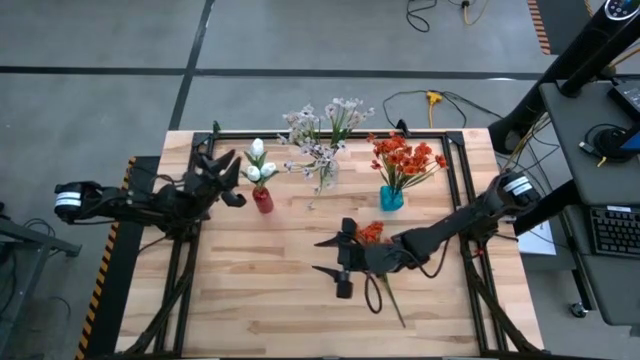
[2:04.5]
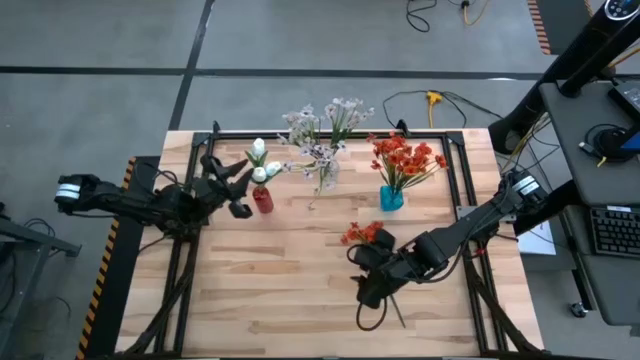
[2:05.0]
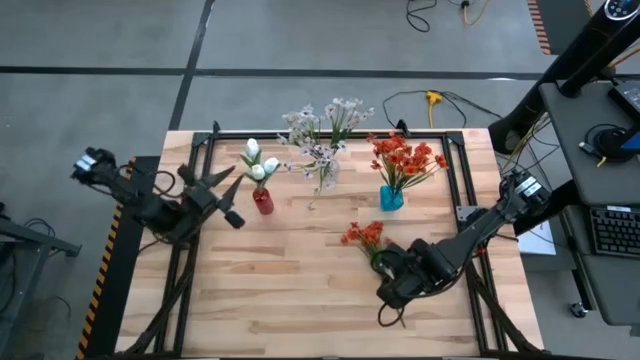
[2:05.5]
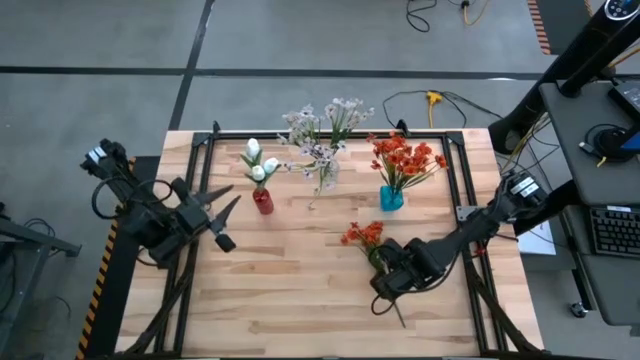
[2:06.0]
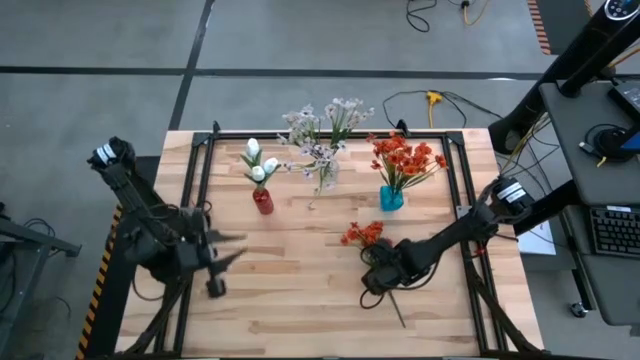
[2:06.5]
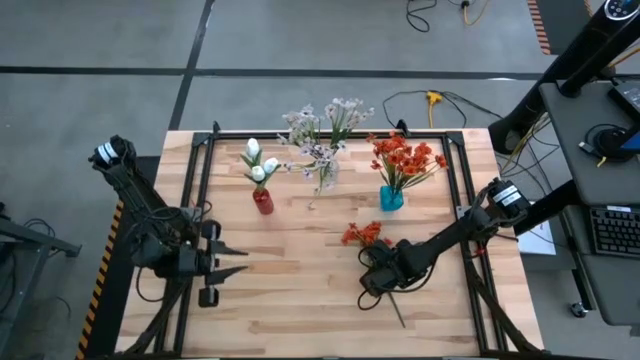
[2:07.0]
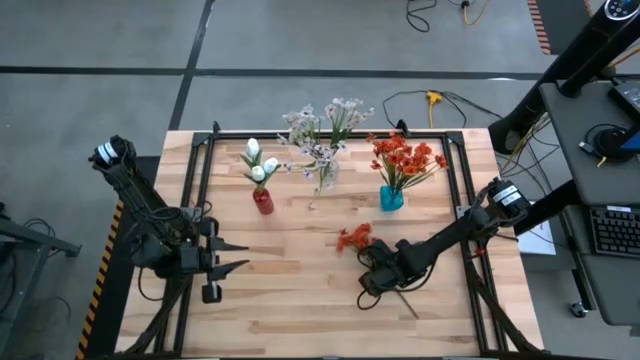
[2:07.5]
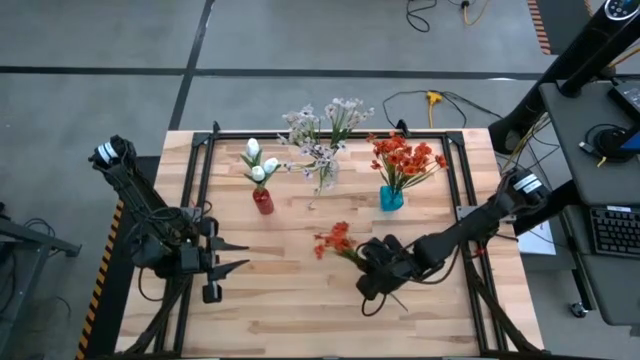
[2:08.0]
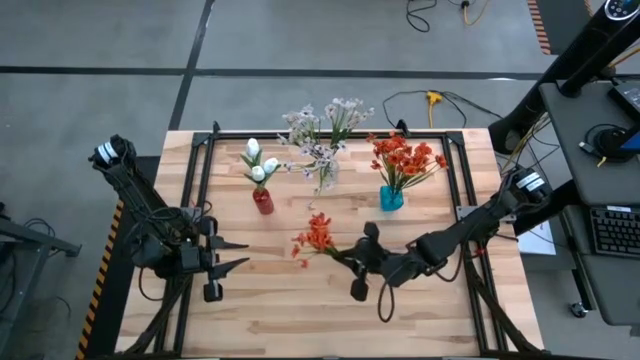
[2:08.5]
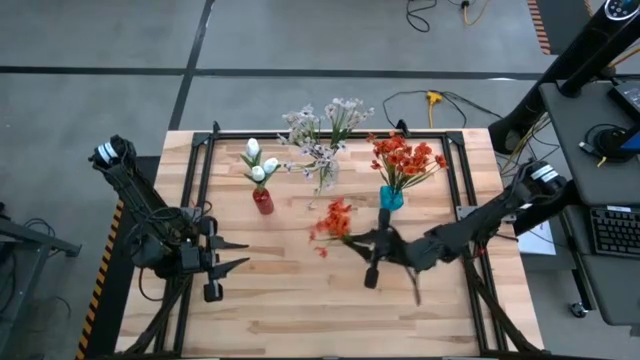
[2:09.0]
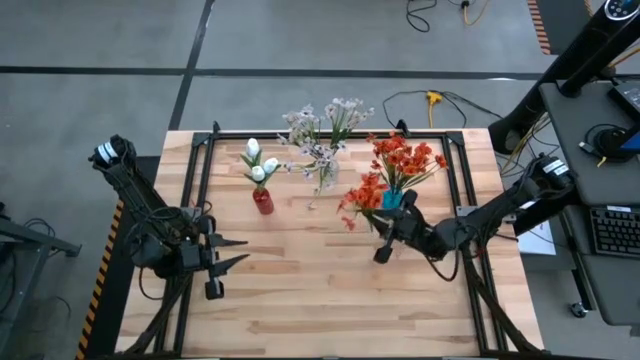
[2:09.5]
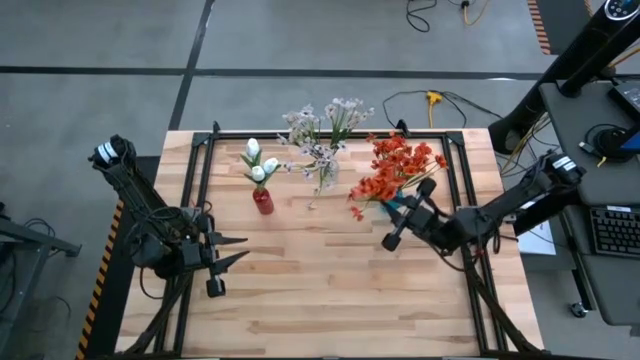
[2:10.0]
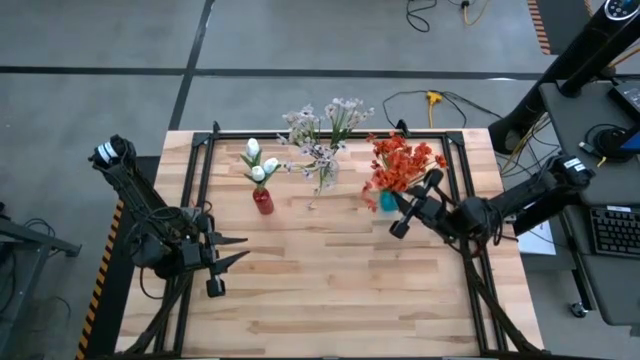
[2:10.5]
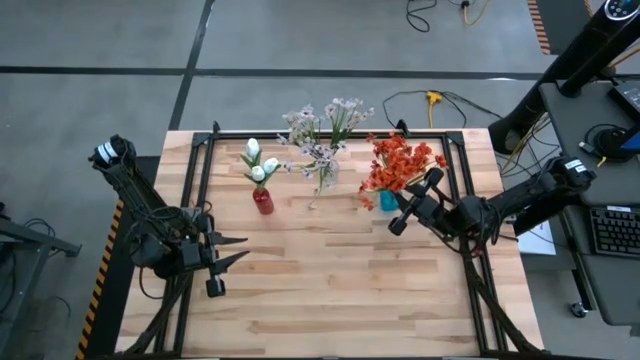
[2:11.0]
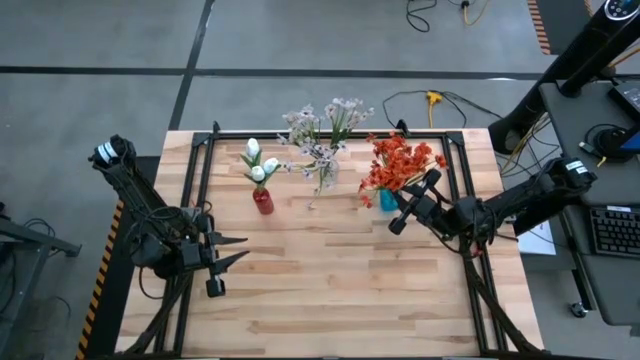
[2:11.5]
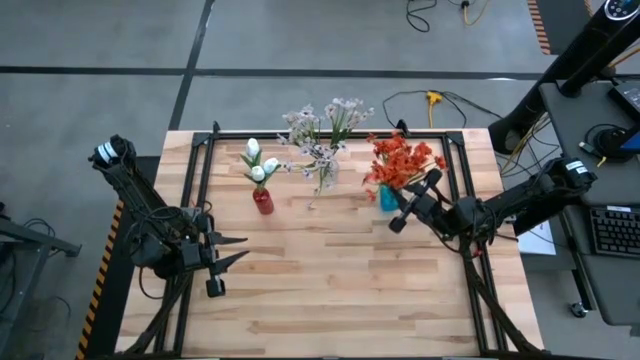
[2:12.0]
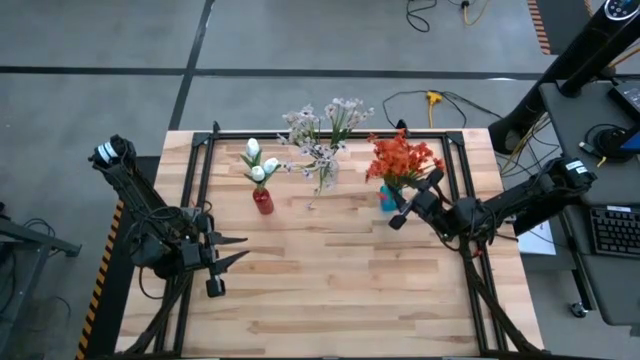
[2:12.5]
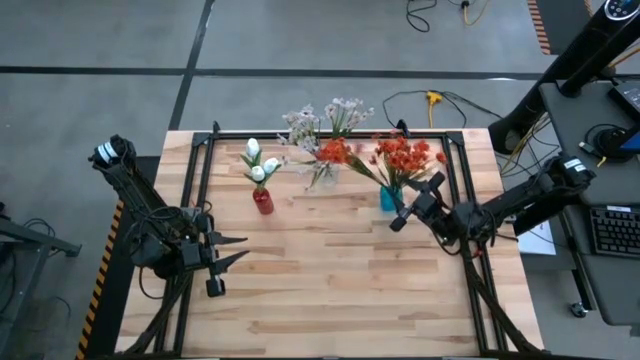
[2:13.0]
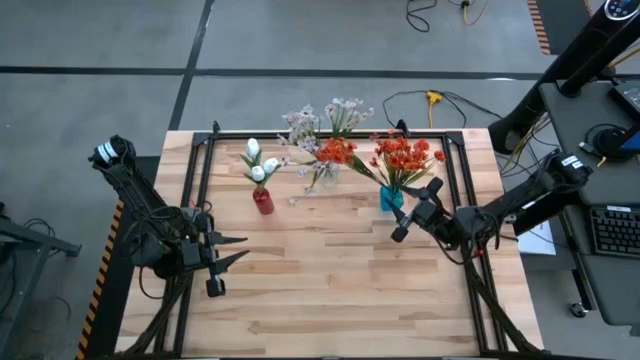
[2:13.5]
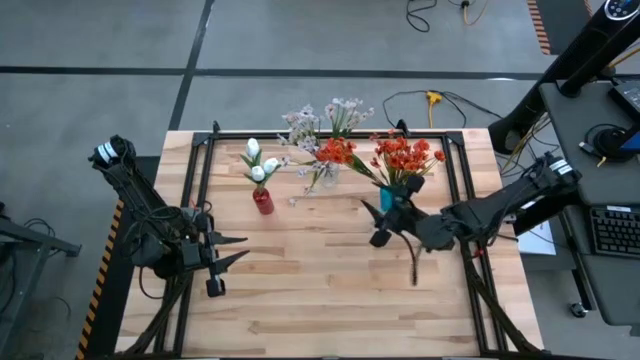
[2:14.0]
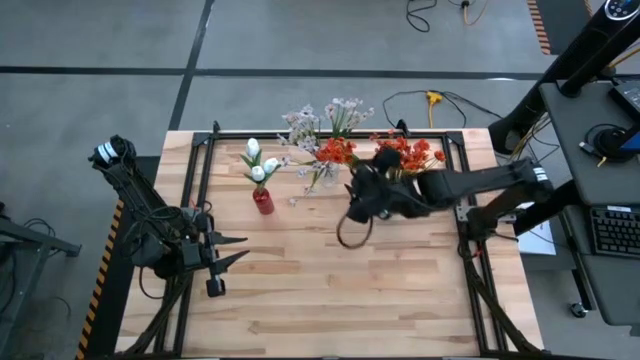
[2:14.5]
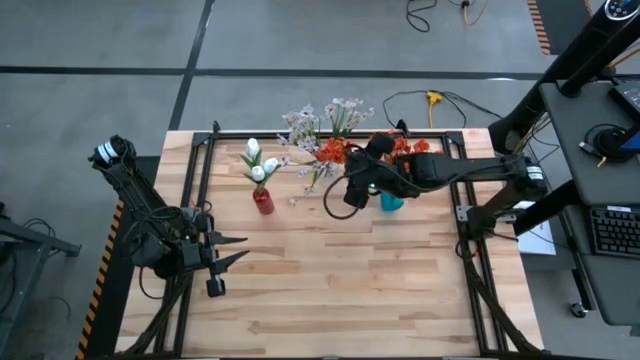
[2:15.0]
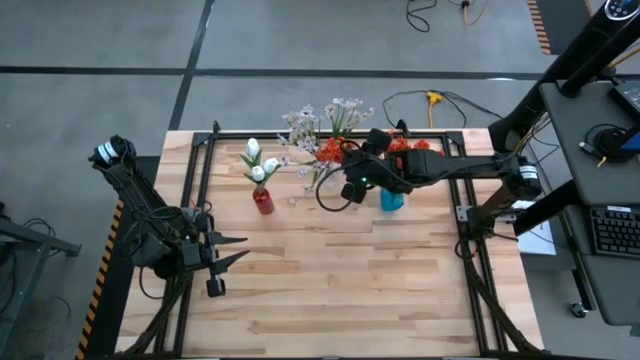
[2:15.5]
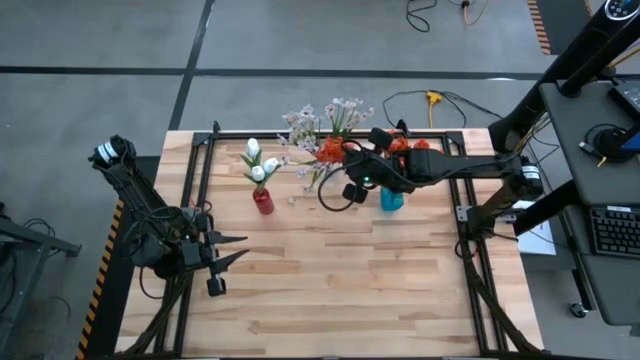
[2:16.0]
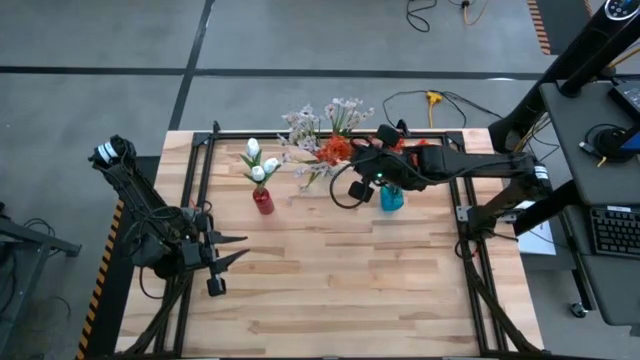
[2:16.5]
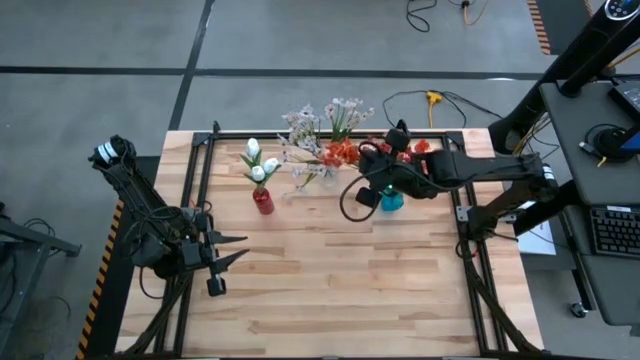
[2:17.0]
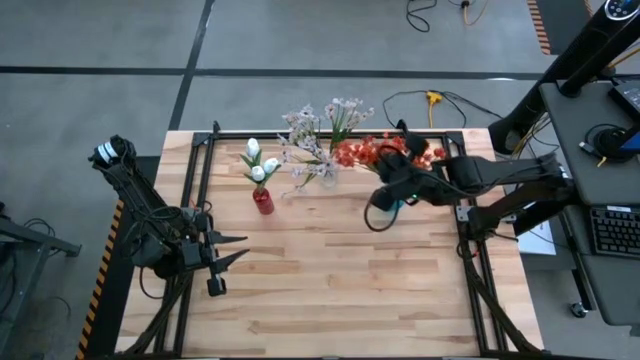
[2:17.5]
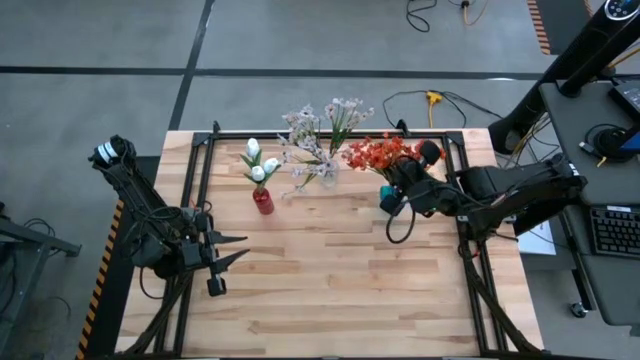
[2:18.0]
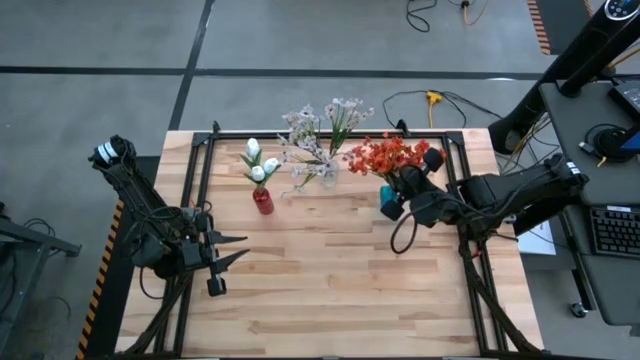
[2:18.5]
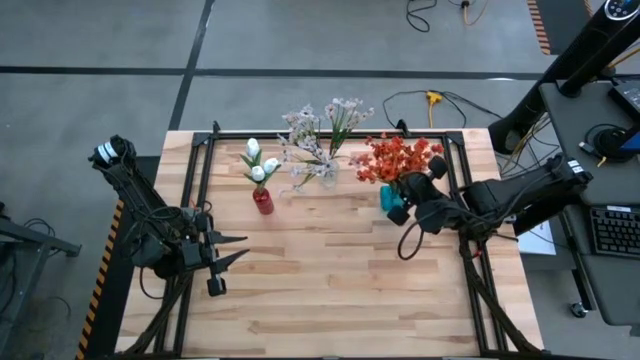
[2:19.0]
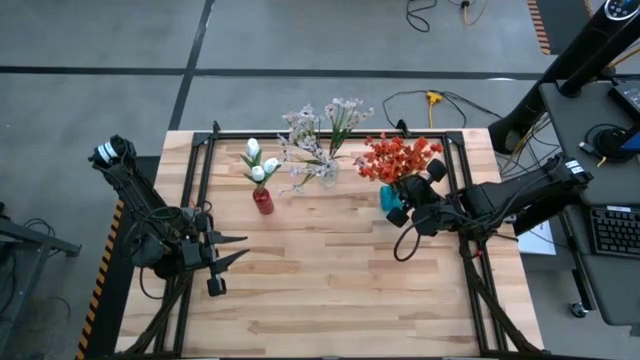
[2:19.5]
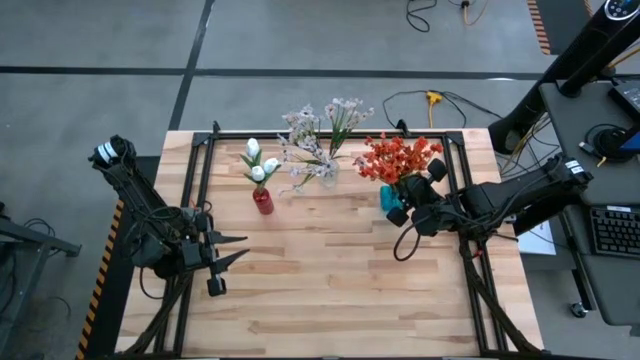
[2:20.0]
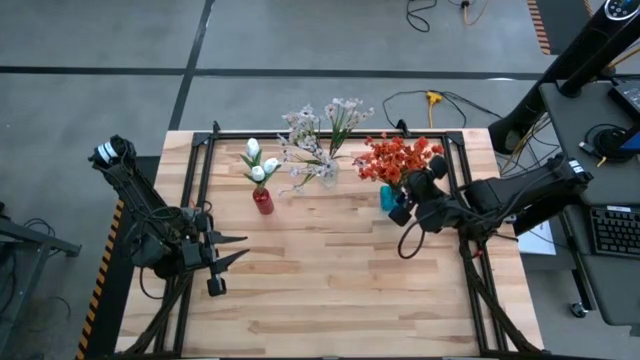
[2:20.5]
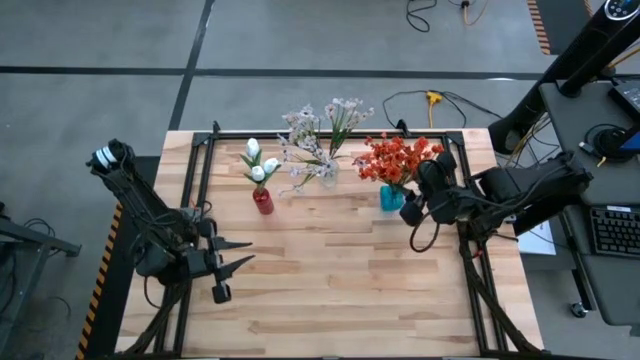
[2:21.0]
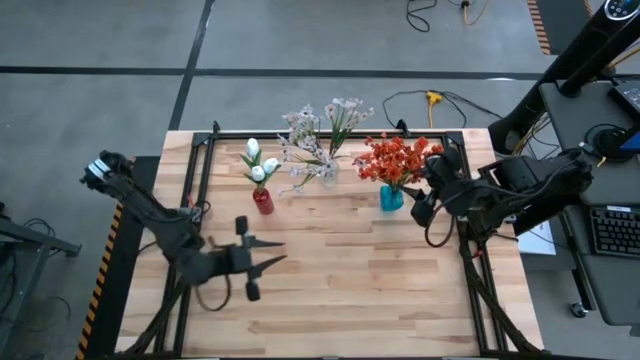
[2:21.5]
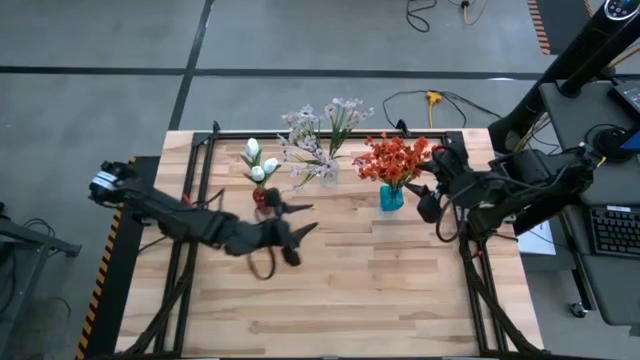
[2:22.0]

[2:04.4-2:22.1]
Task: Sort flowers into vase by color
Put the orange flowers into the blue vase

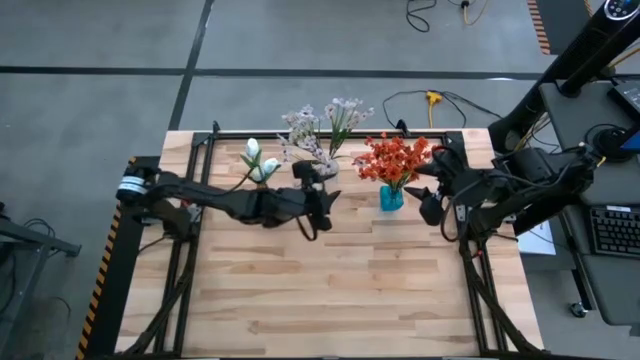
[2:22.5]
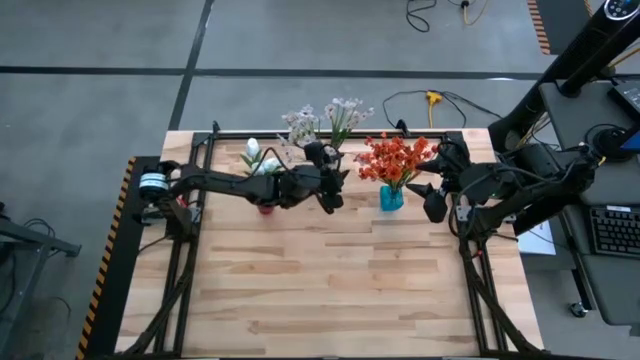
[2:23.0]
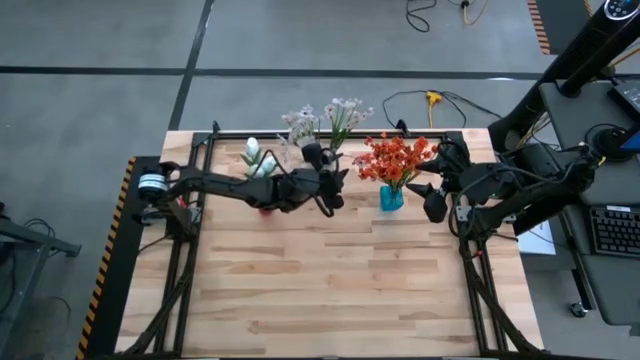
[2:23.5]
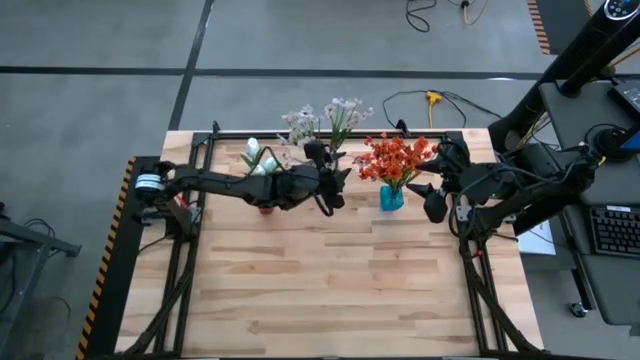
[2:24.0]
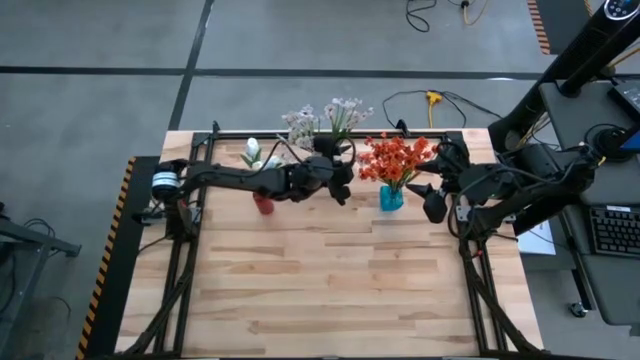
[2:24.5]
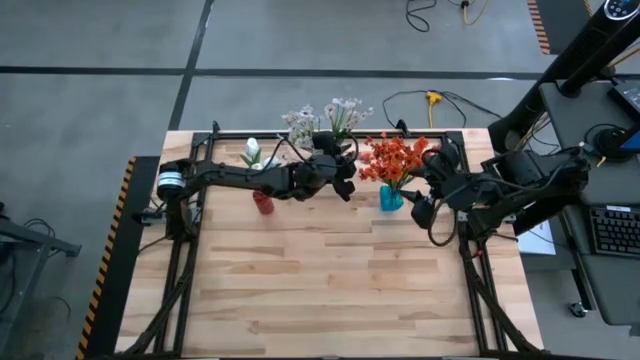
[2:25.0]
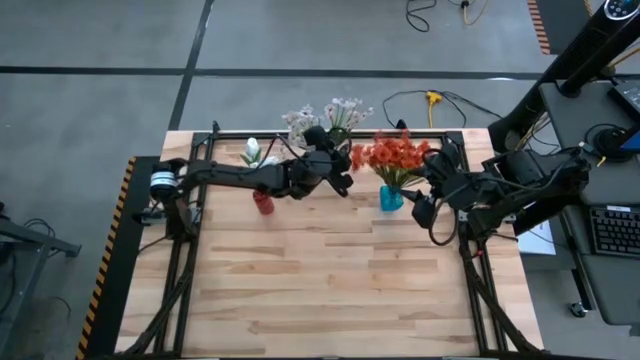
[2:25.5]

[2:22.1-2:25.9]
Adjust the white flowers
